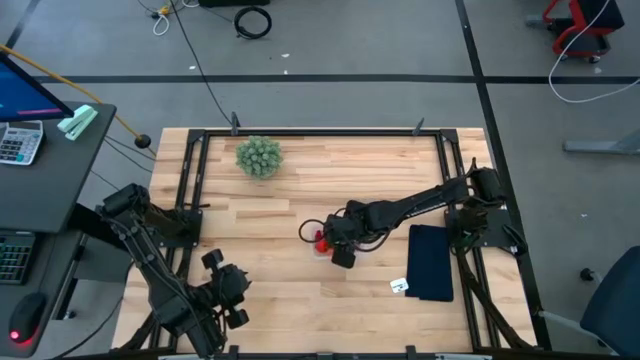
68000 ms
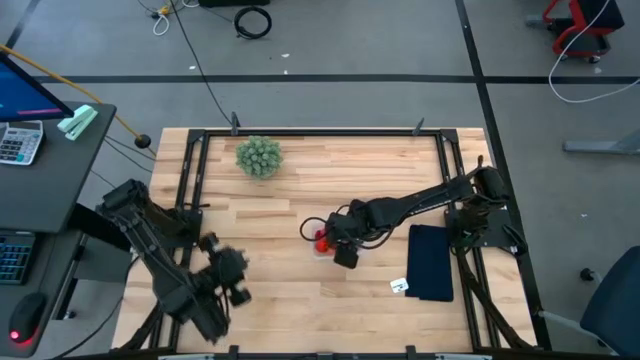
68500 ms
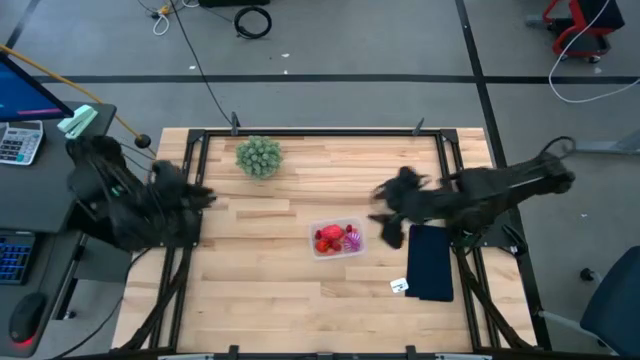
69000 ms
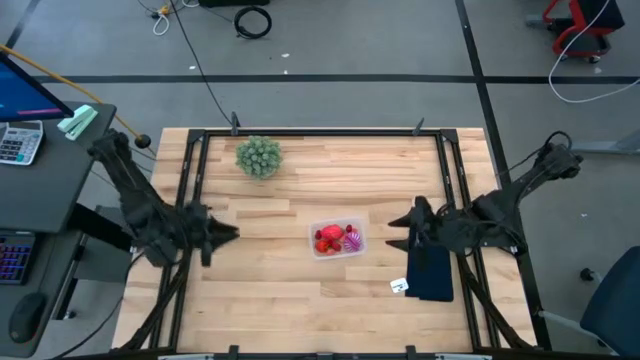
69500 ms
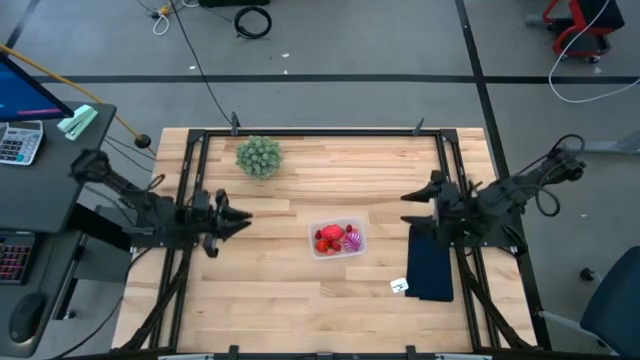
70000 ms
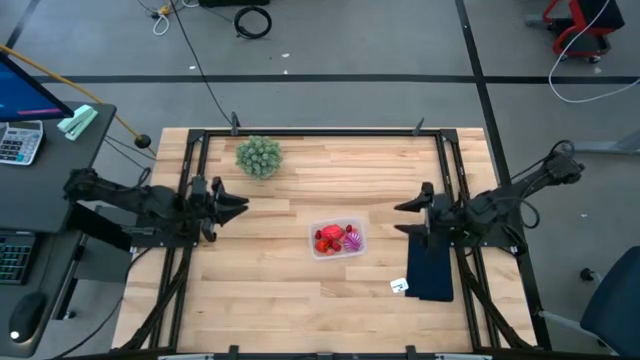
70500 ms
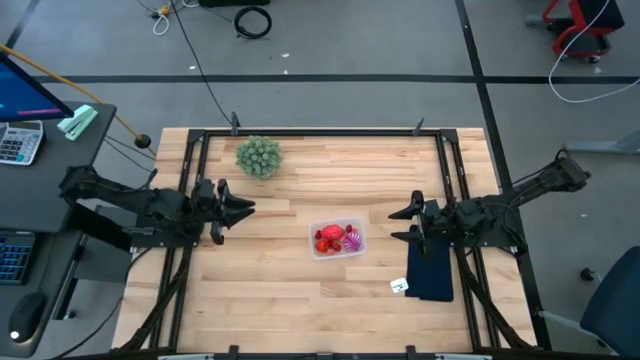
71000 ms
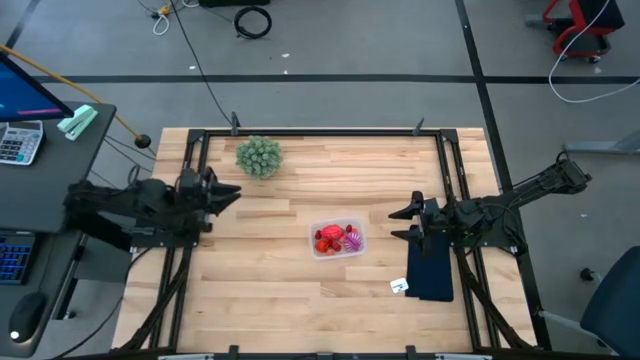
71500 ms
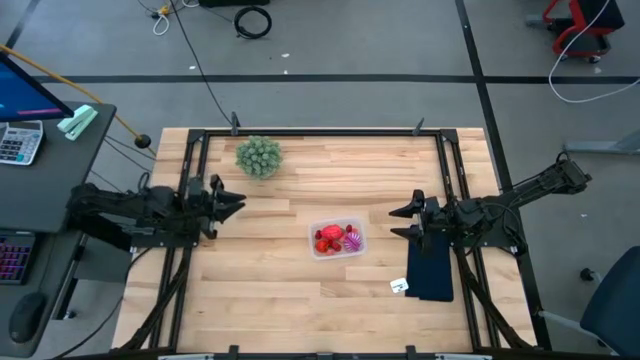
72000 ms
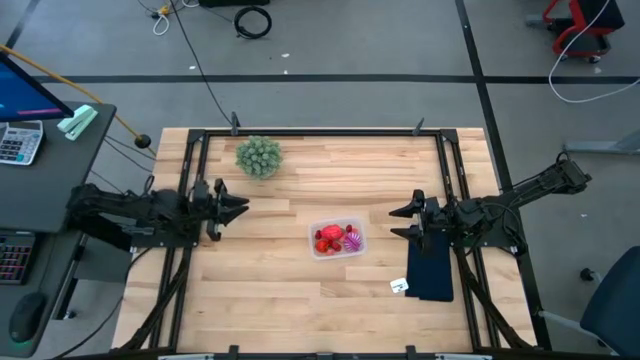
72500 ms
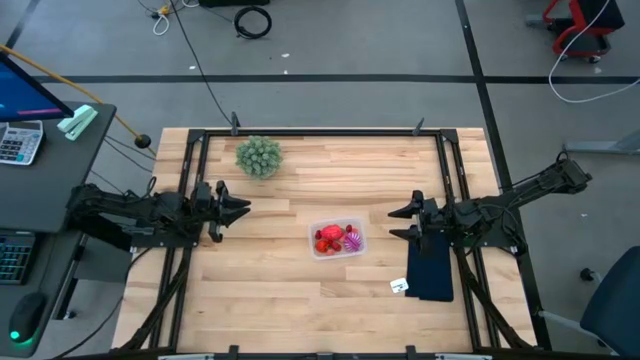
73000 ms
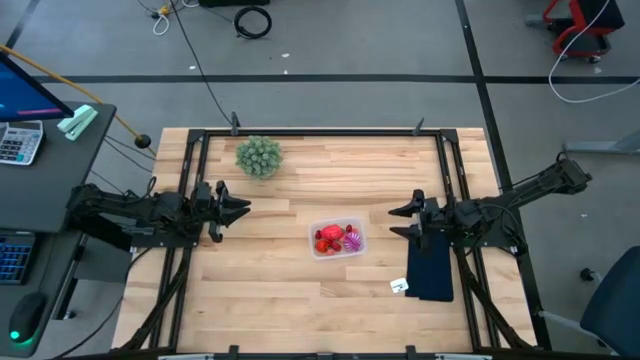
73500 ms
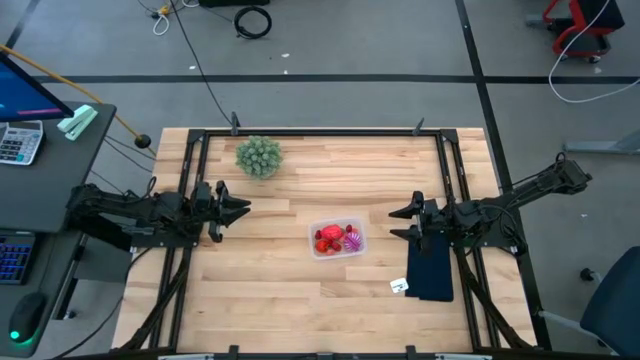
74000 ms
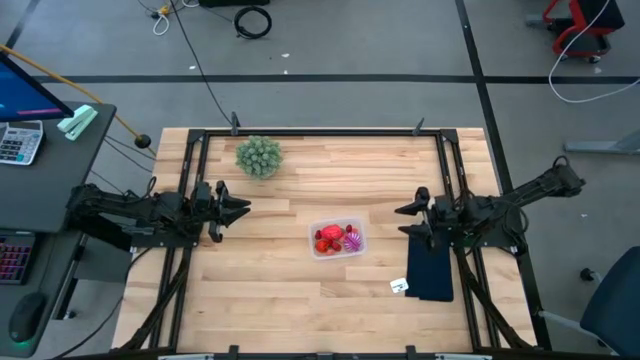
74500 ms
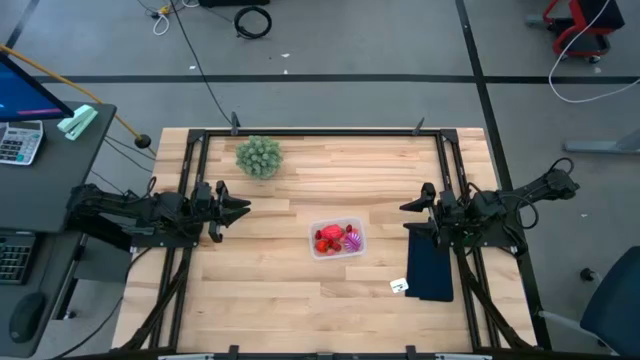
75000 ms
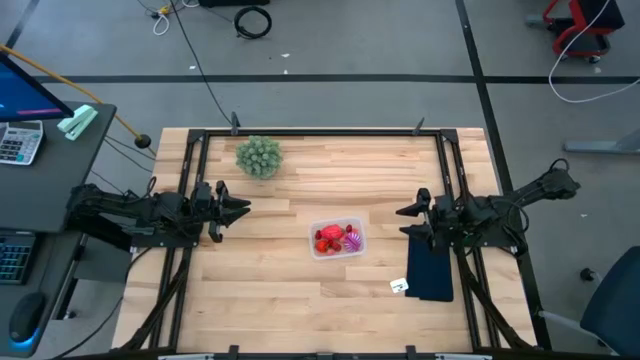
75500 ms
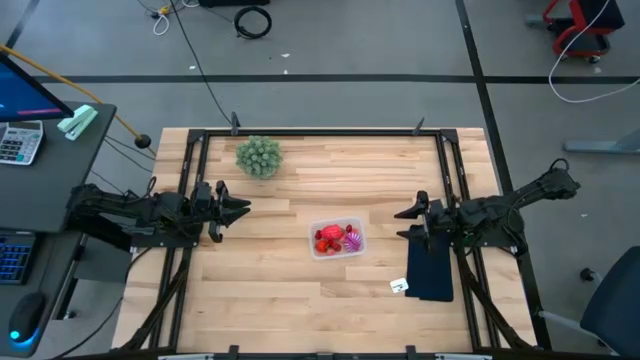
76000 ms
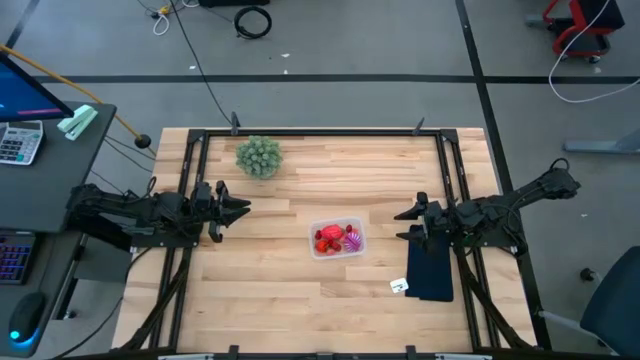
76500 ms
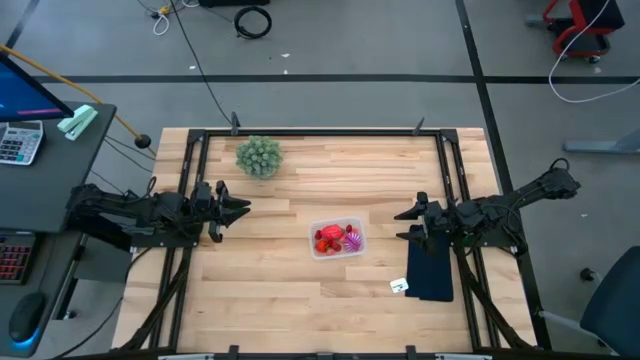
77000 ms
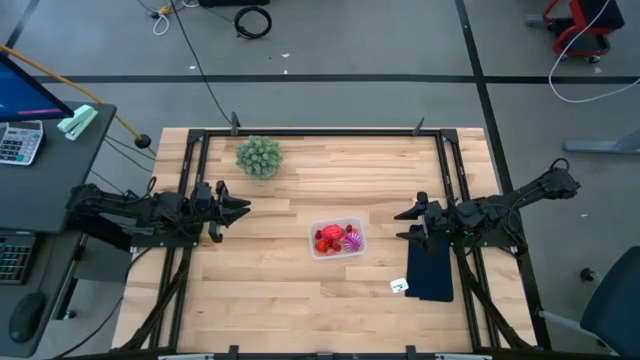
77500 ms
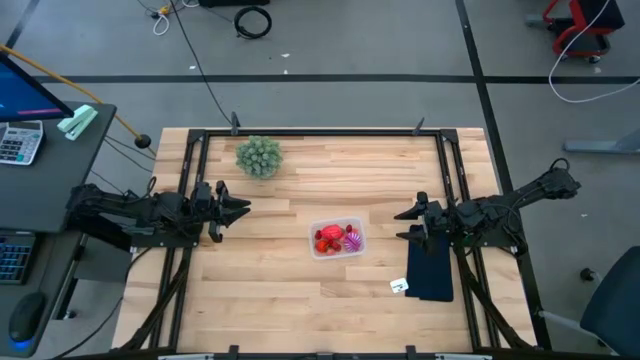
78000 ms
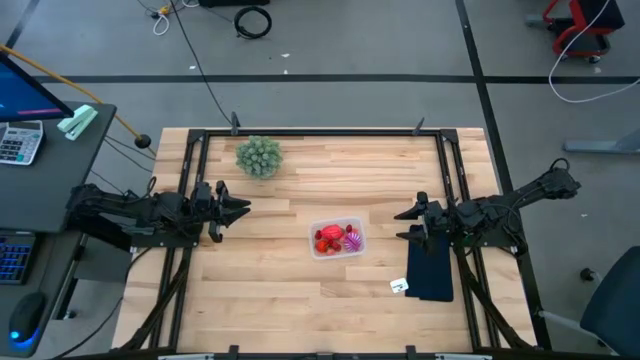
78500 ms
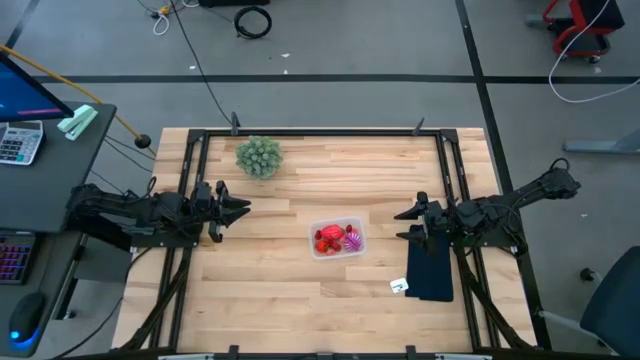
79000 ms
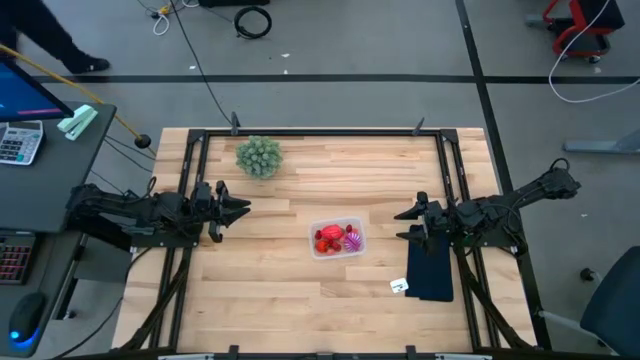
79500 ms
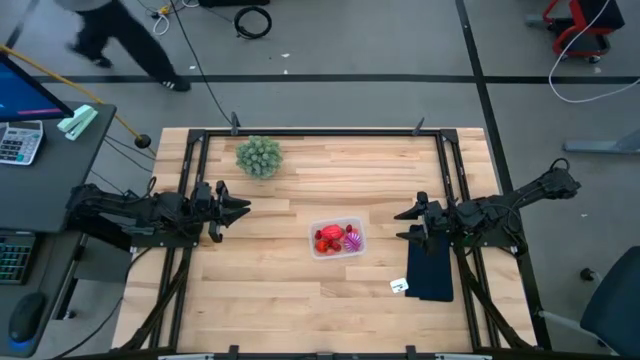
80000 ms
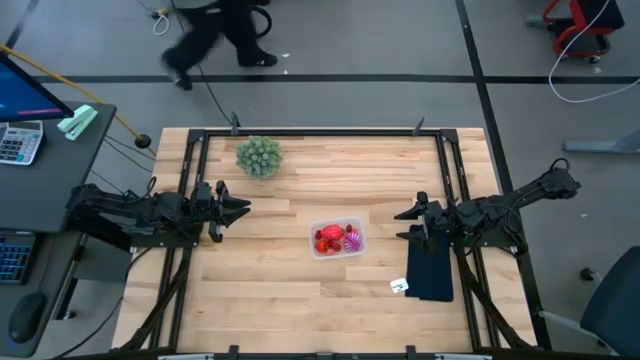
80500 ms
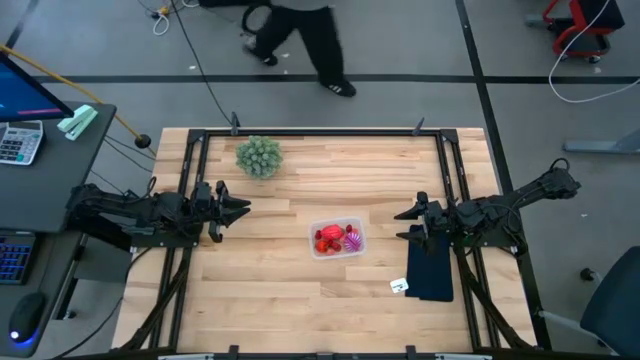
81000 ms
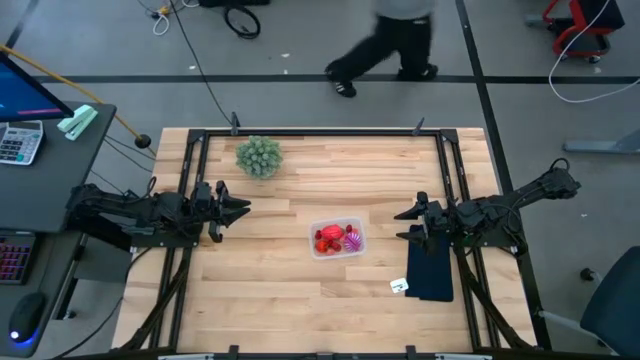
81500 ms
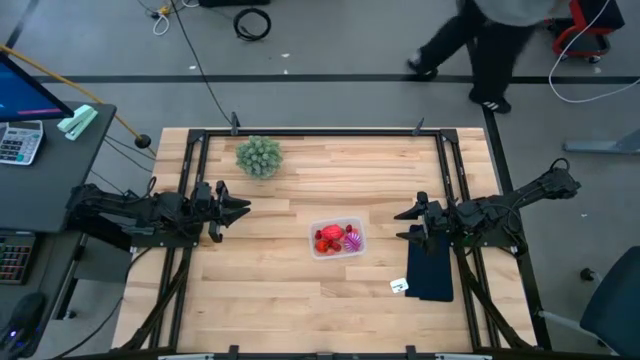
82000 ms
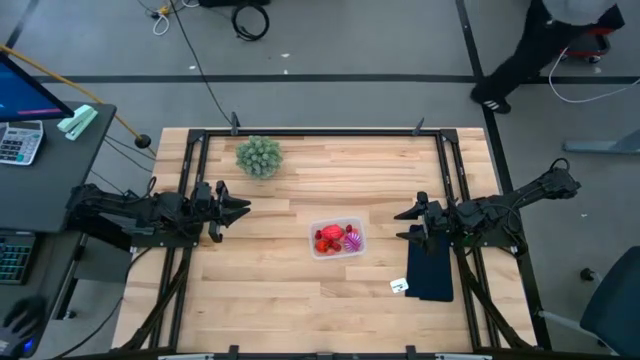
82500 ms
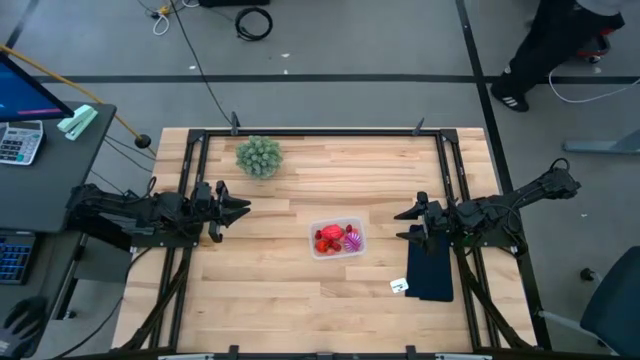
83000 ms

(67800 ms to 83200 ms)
Task: Pick and placing Produce into tupperware
Return to Home Position
